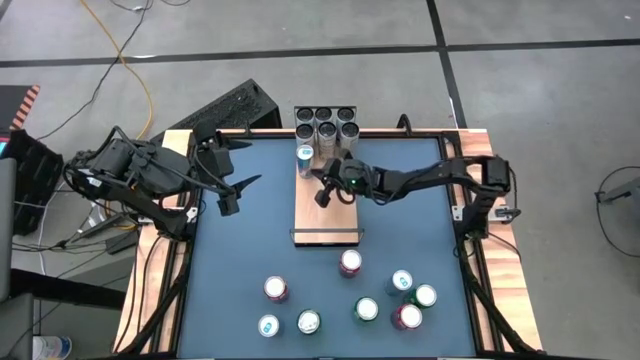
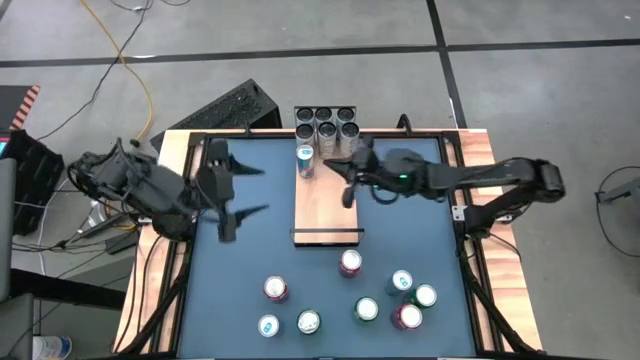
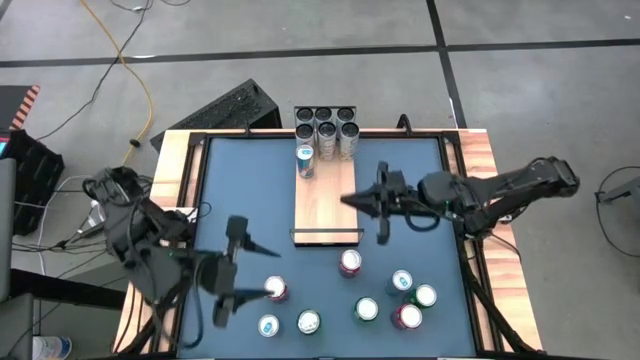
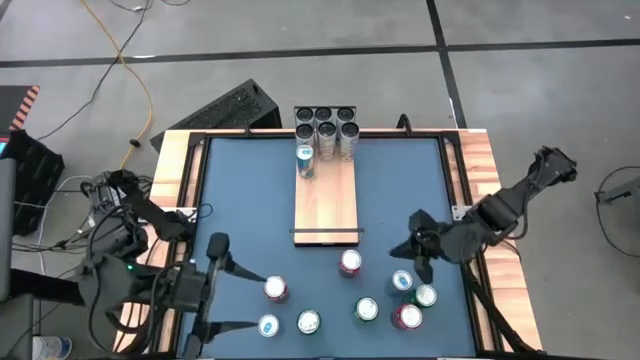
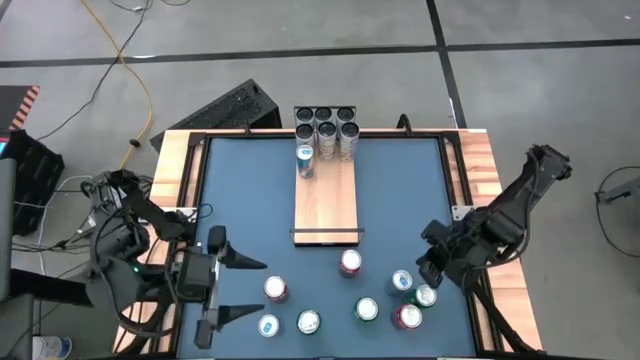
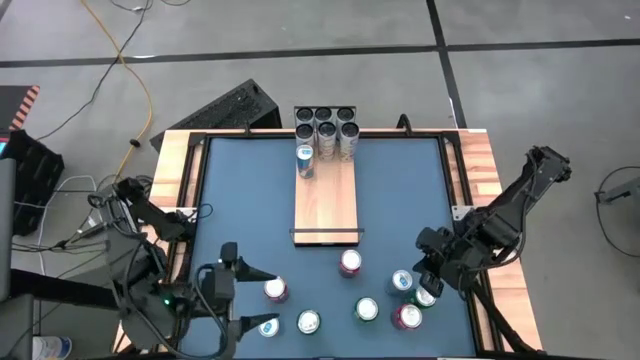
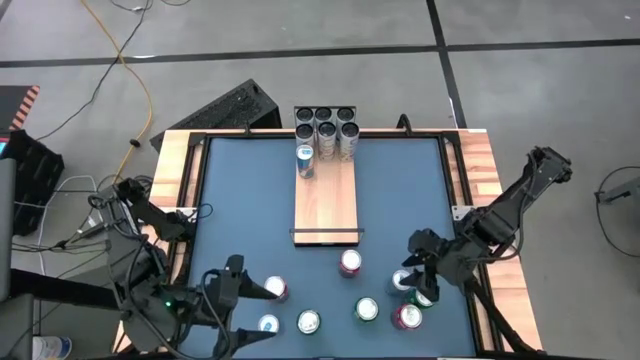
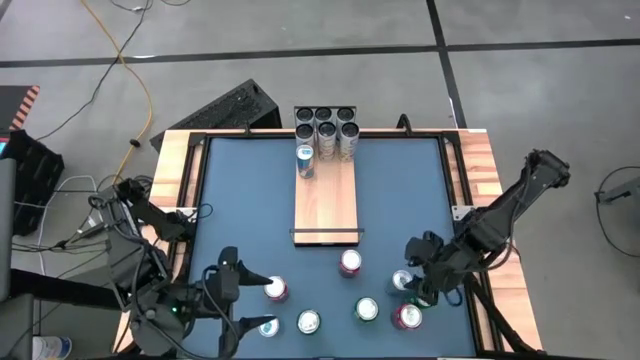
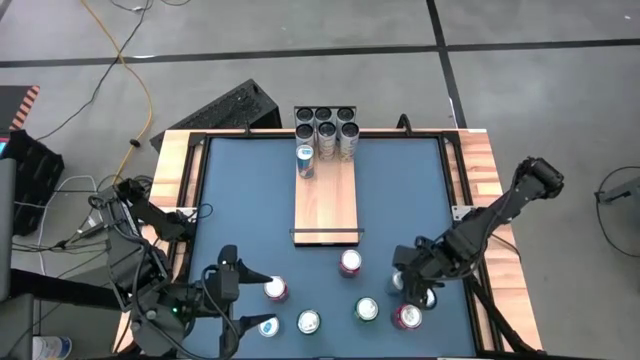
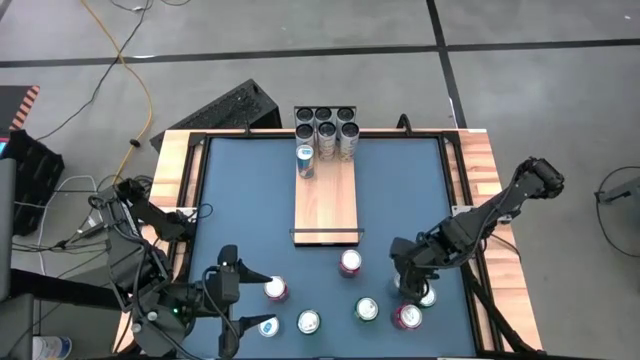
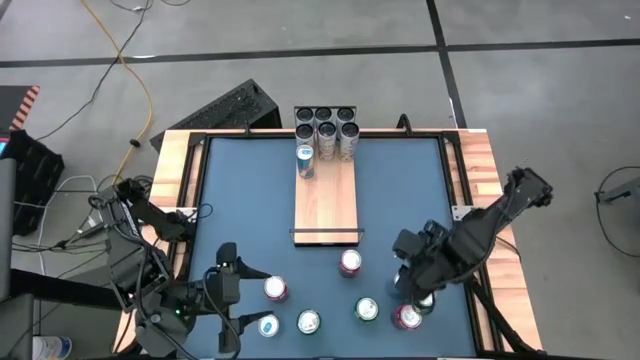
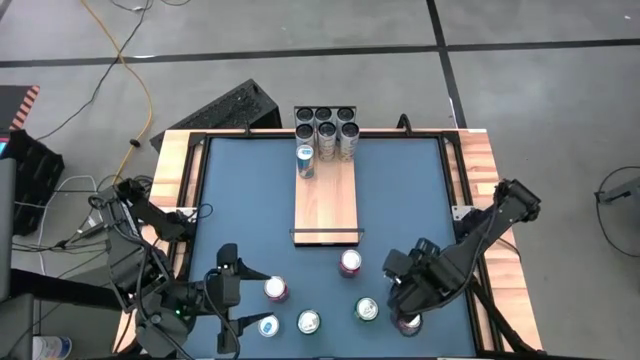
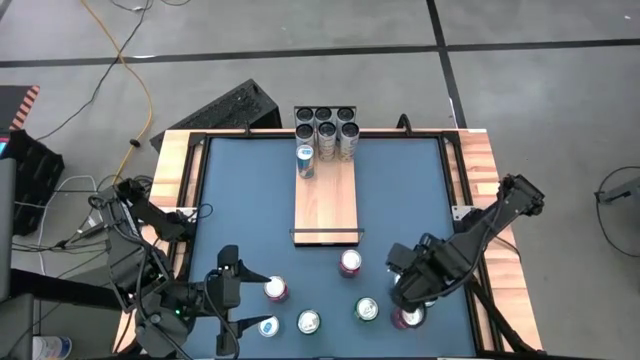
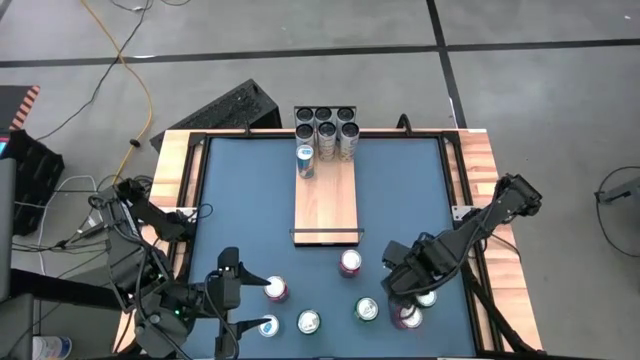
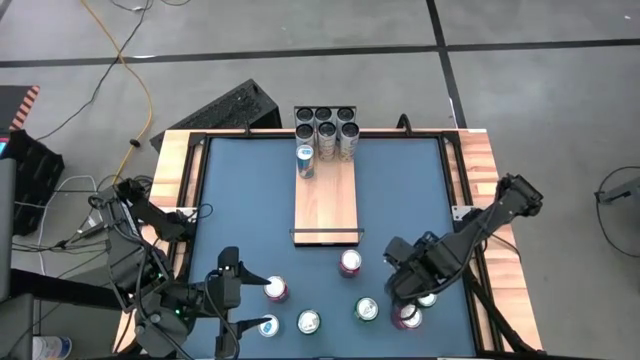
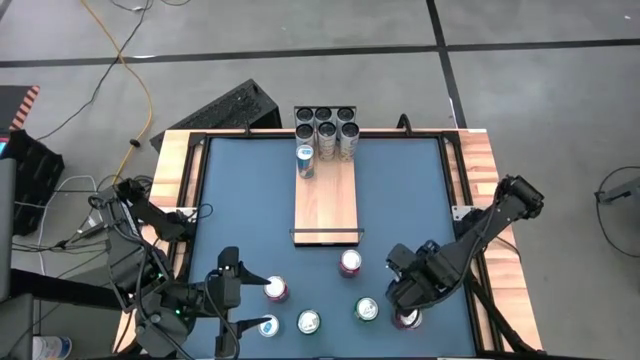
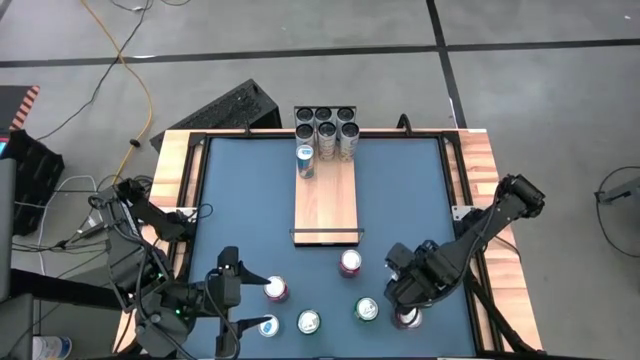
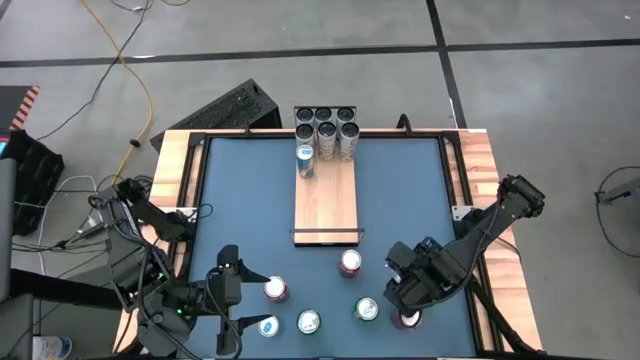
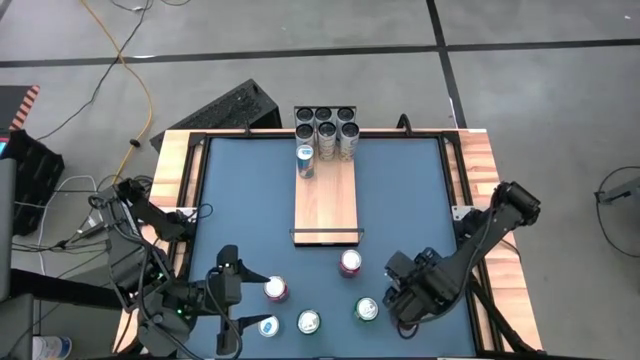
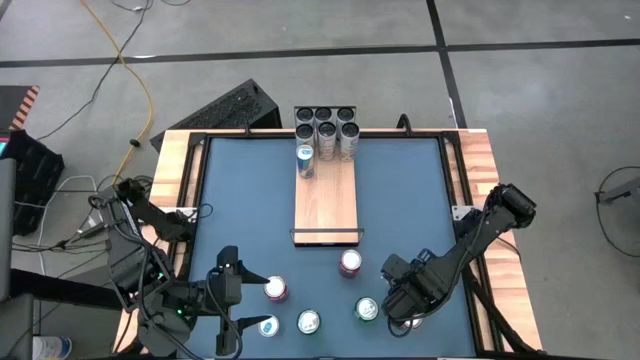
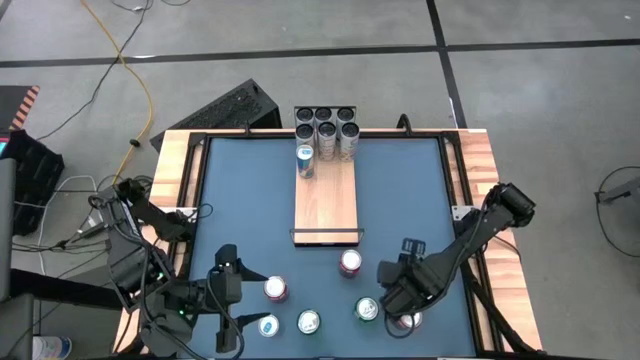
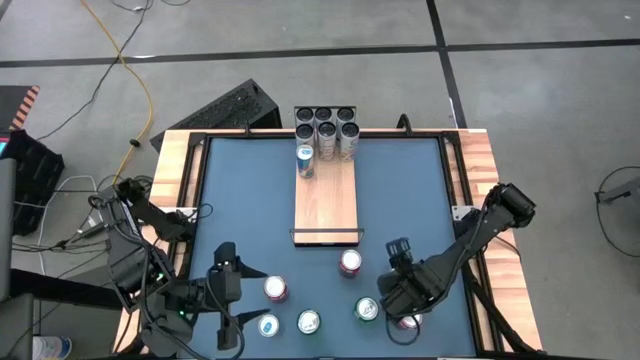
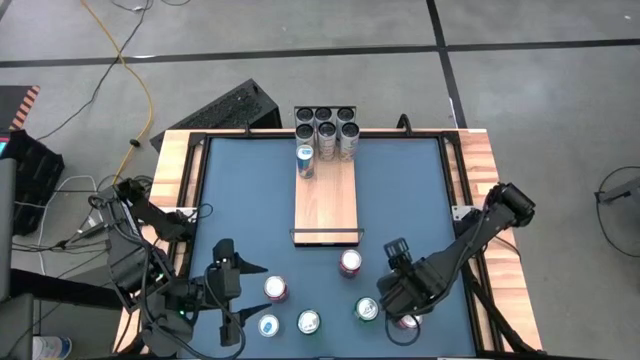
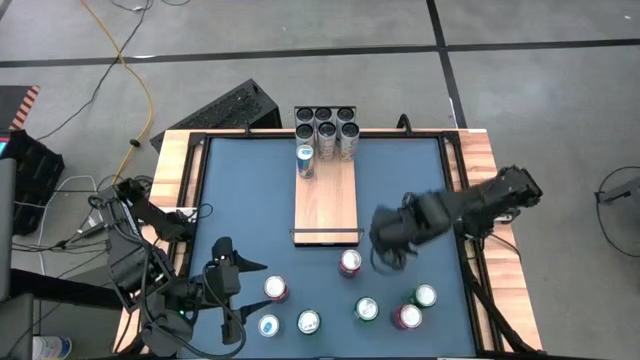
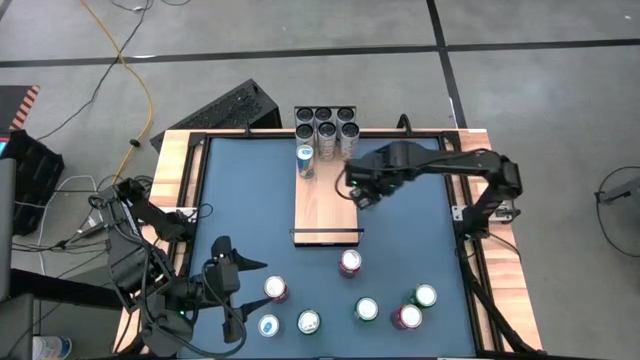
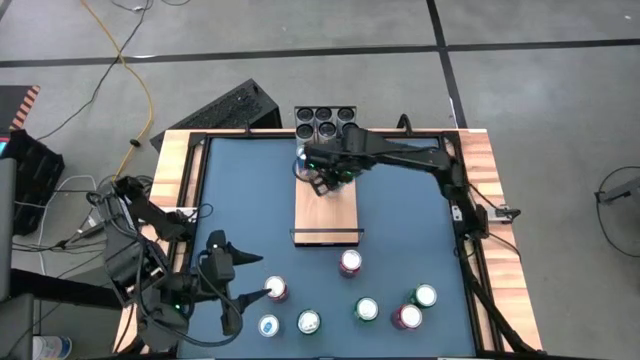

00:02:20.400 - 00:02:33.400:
Task: Place canned beverage on shelf
Put the right blue soda can on the shelf aligned with the other blue soda can

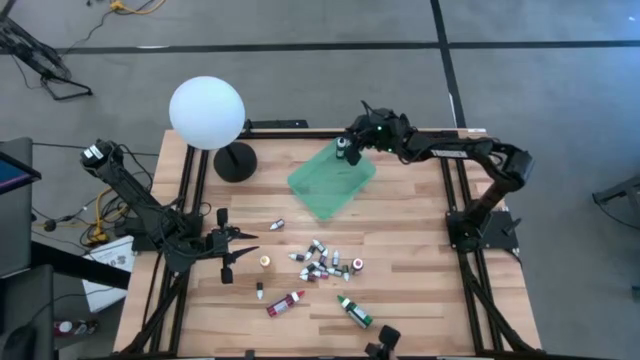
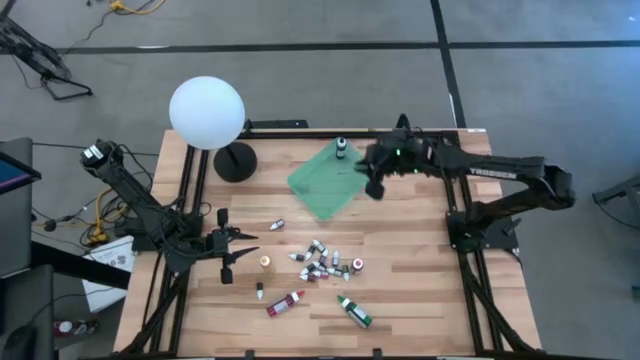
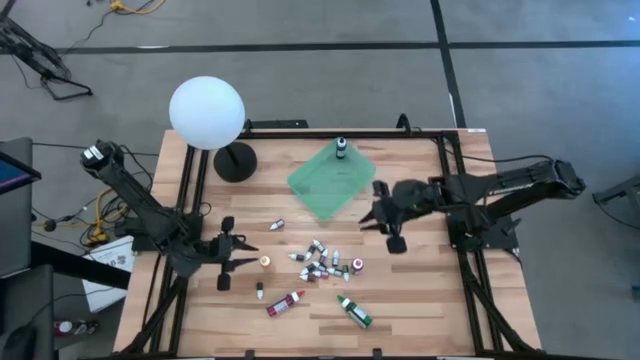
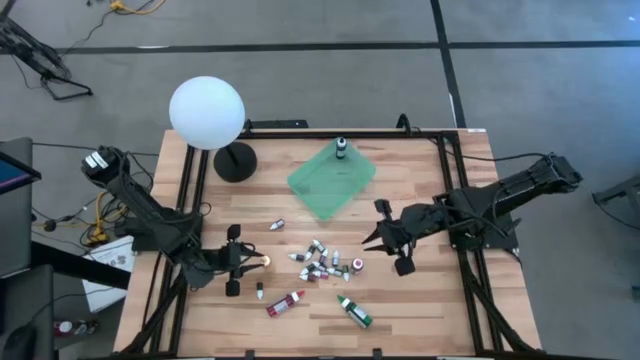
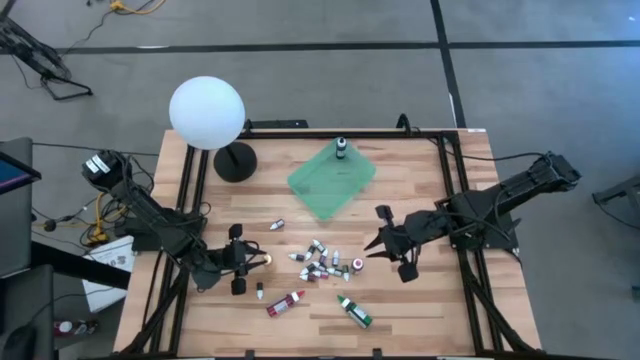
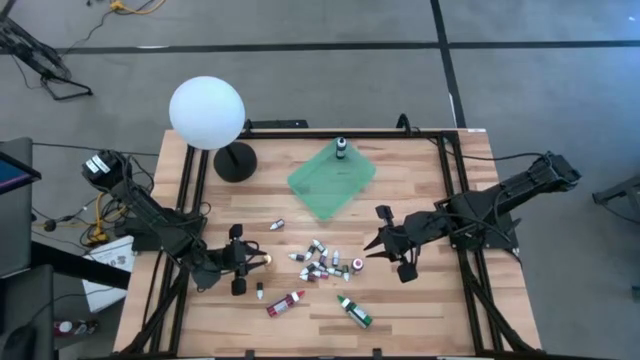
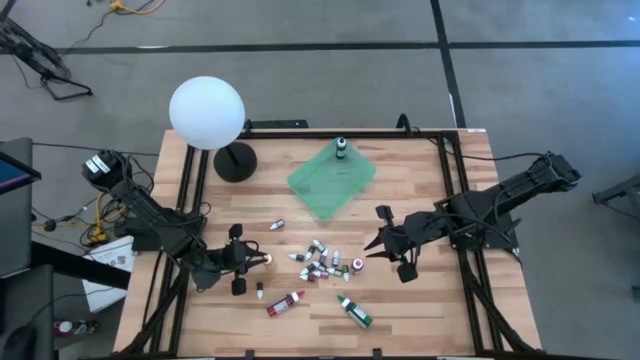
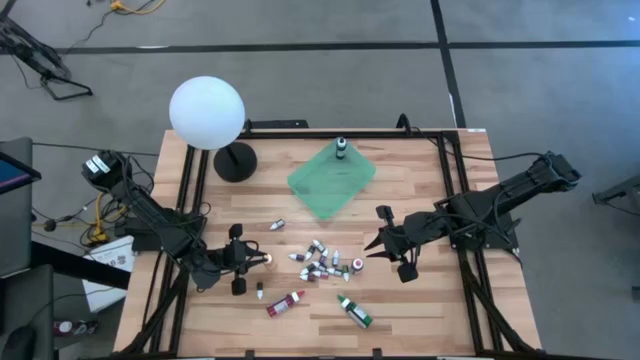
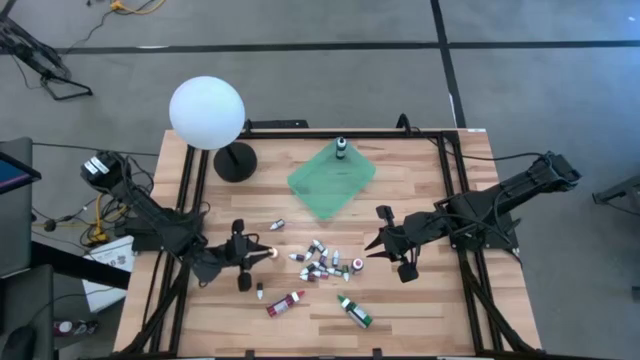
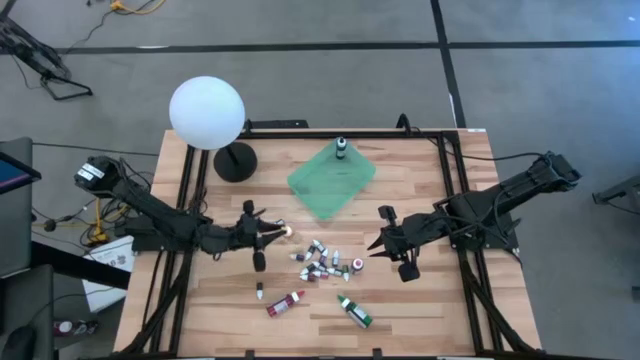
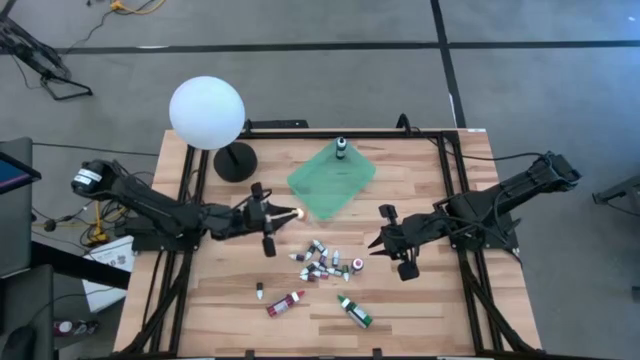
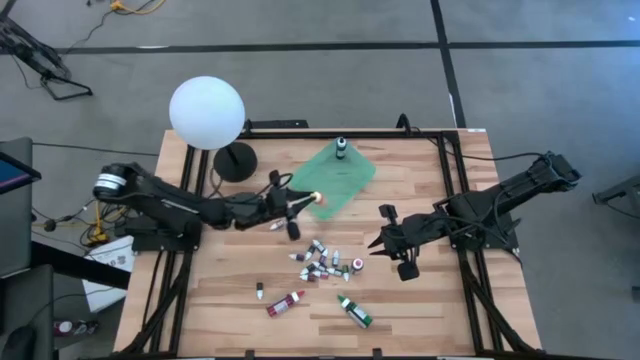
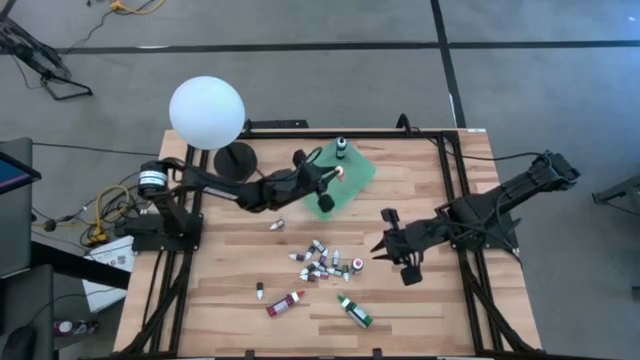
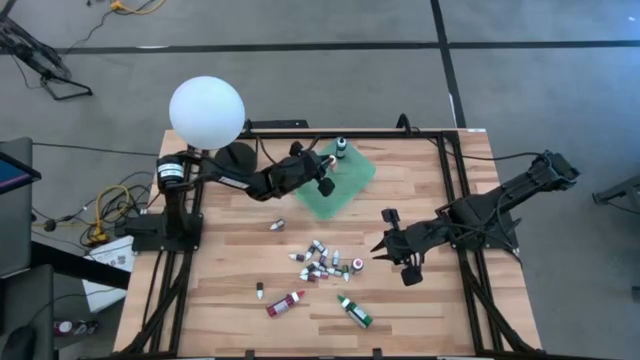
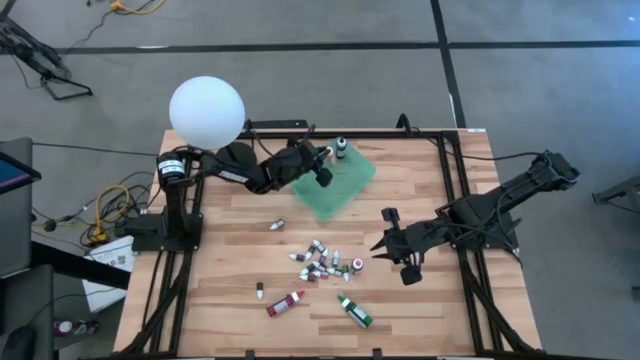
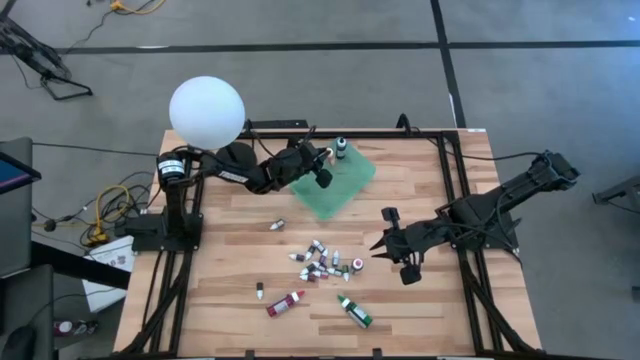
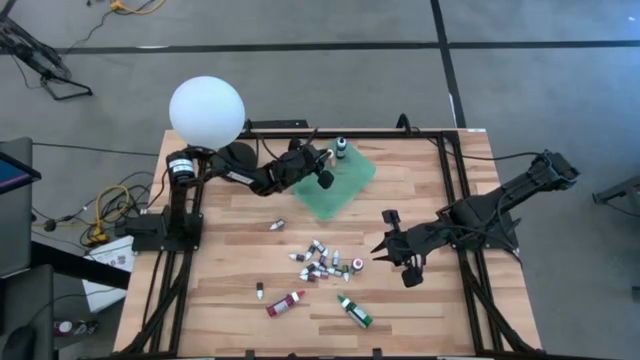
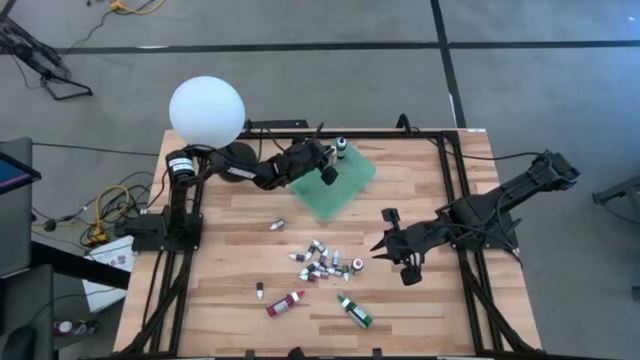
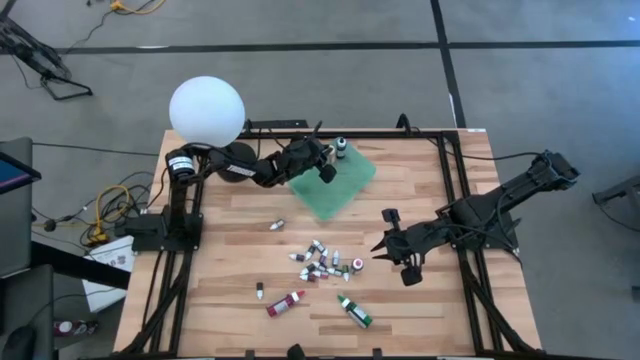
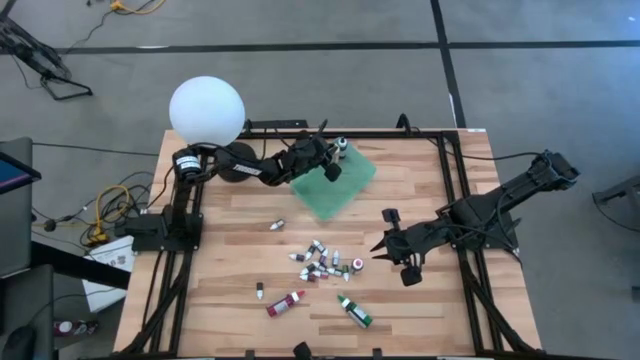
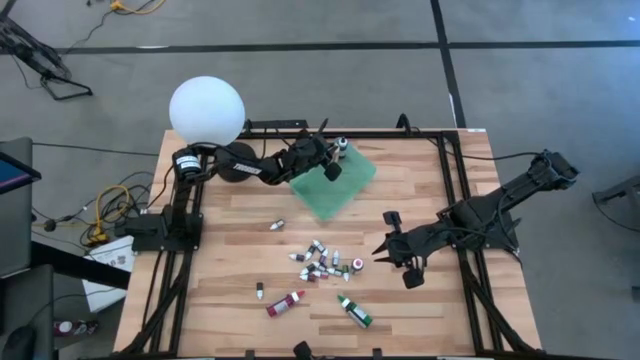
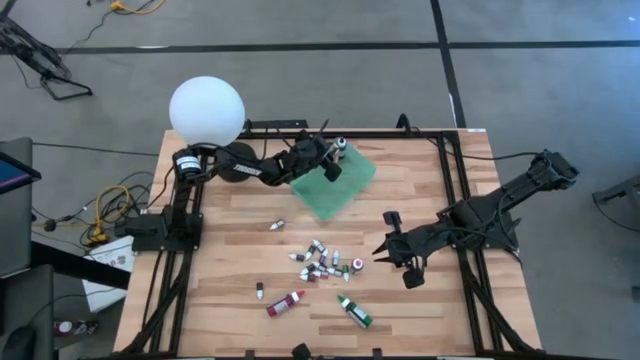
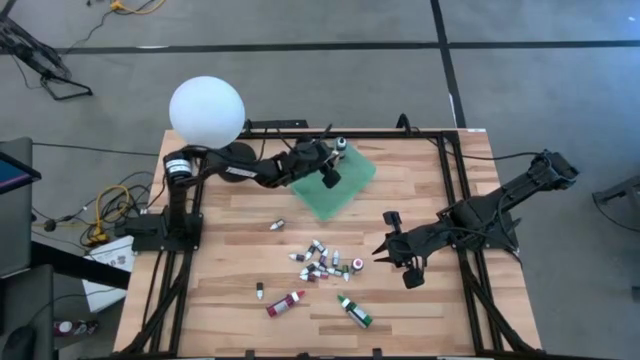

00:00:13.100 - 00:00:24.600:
Task: Pick & Place food coloring
Put the yellow food coloring bottle into the green bin
